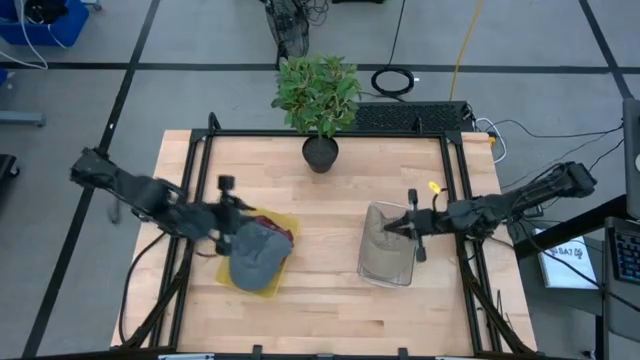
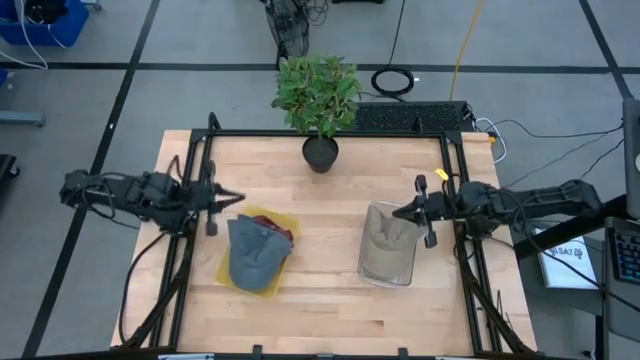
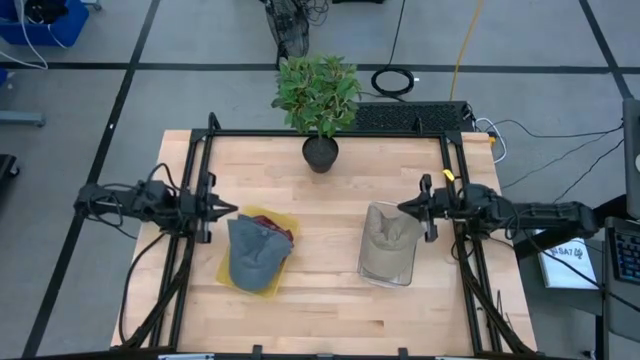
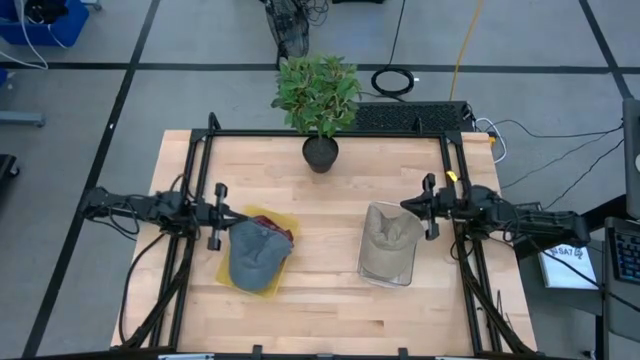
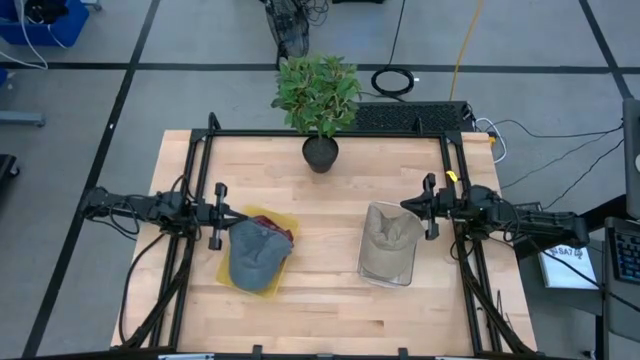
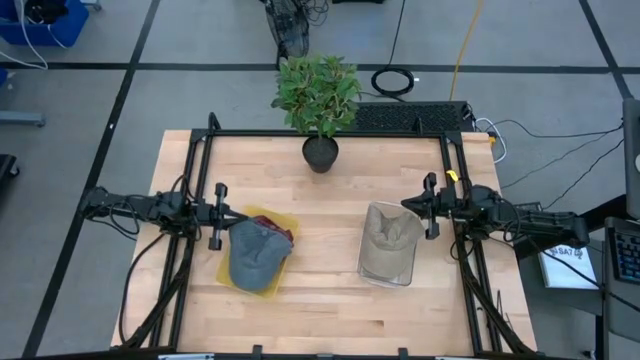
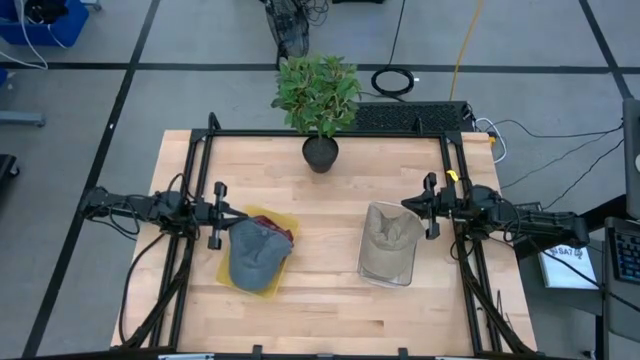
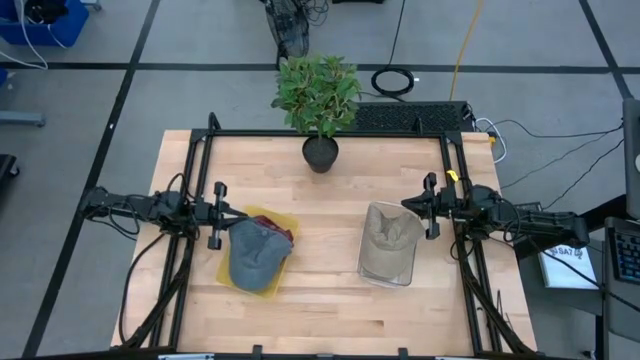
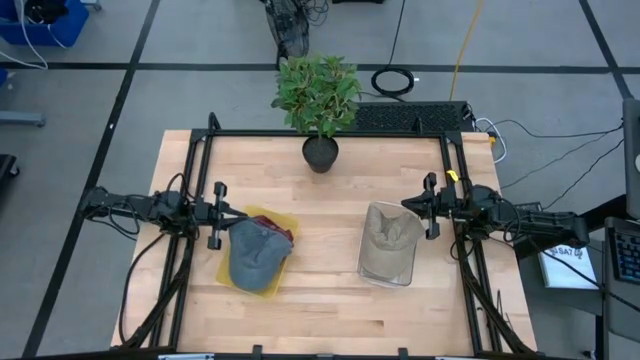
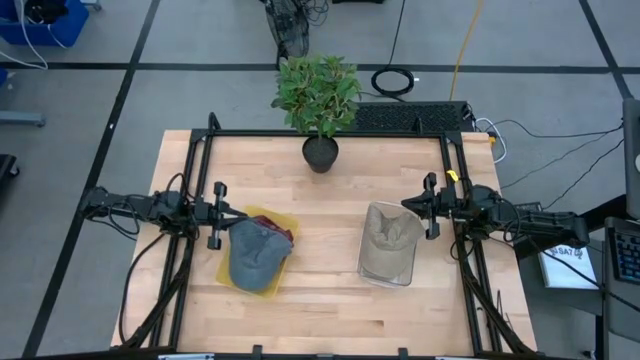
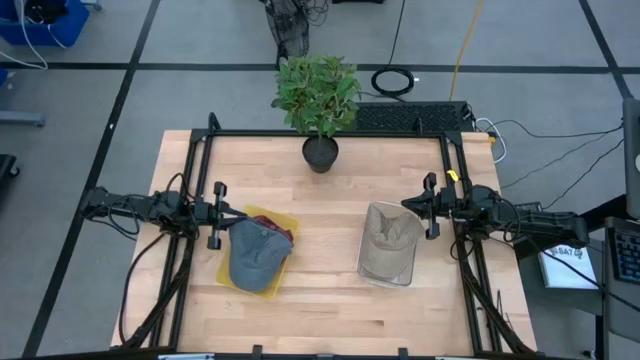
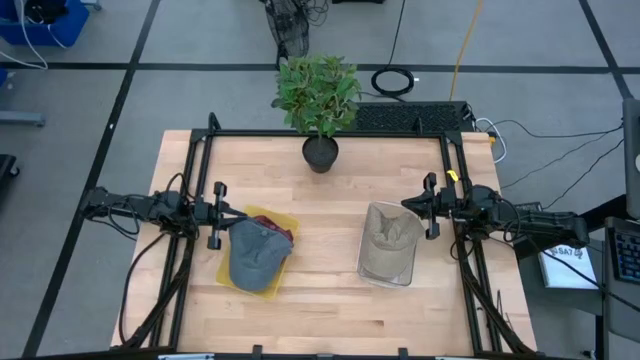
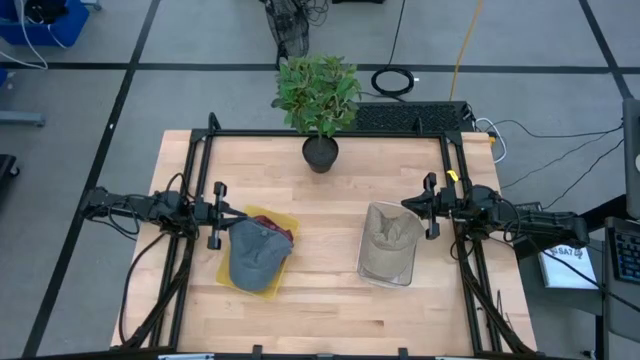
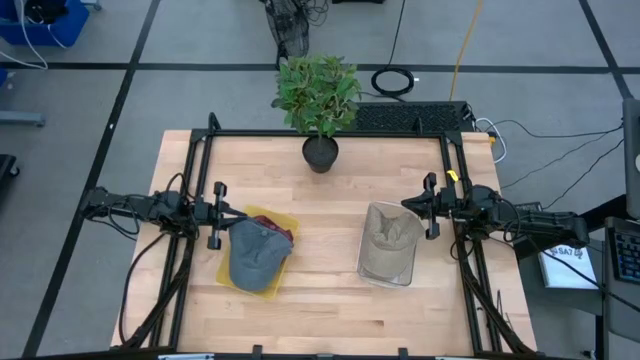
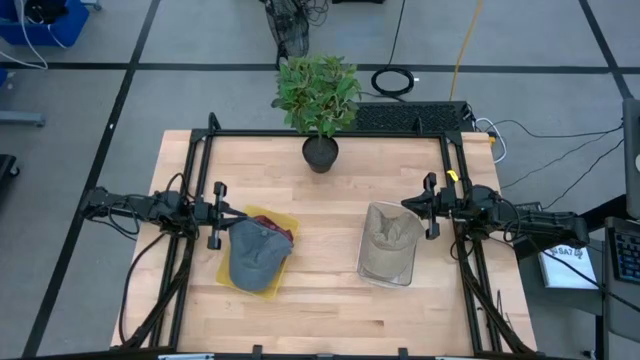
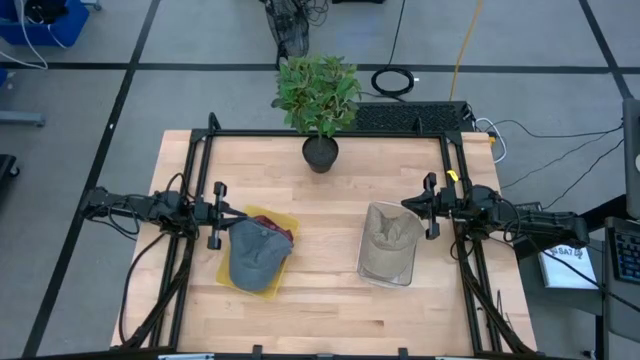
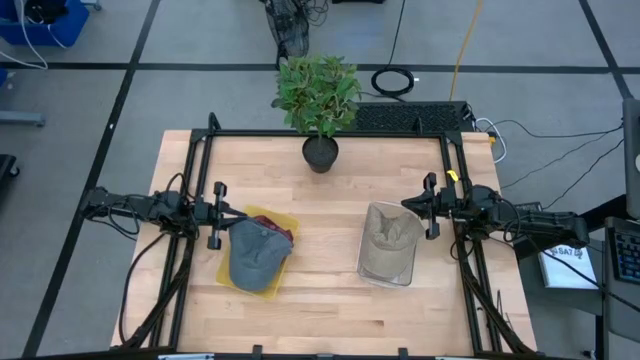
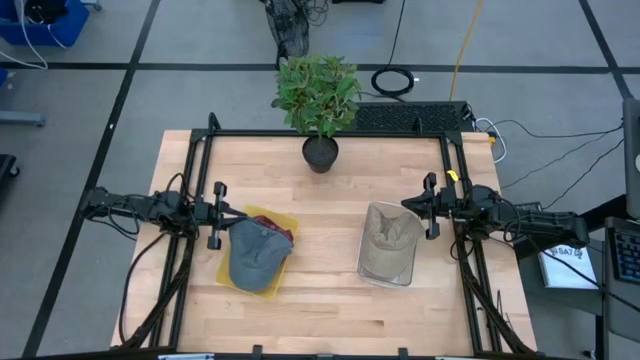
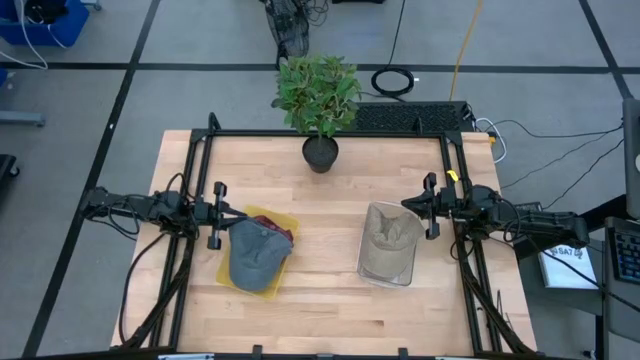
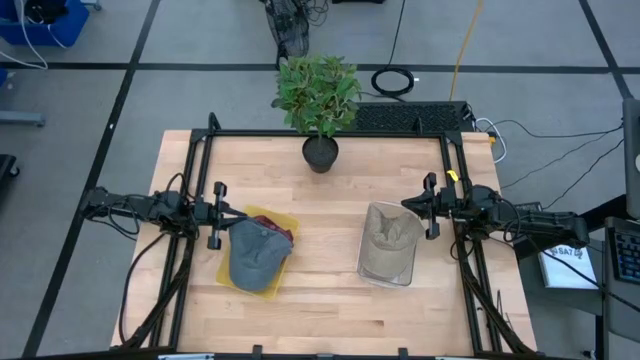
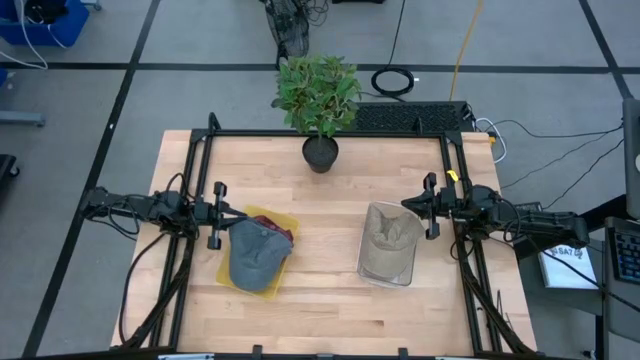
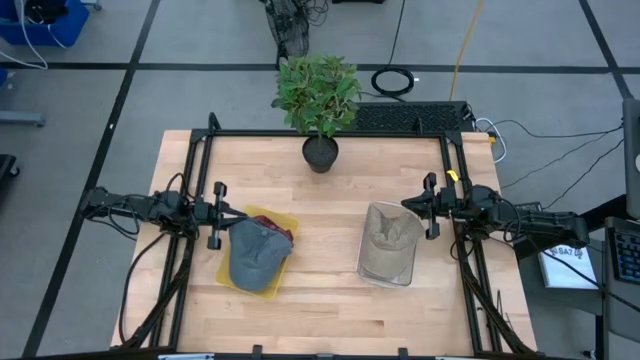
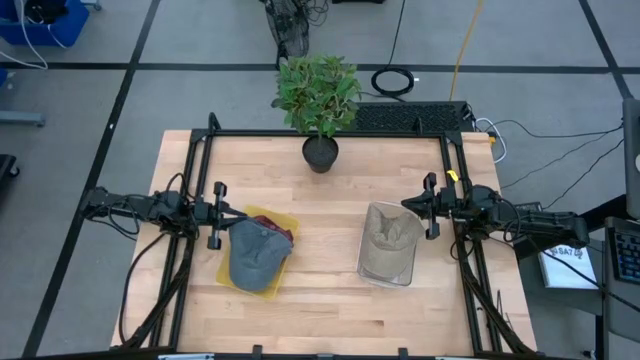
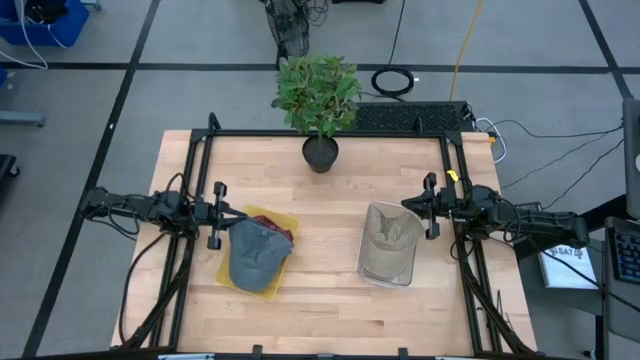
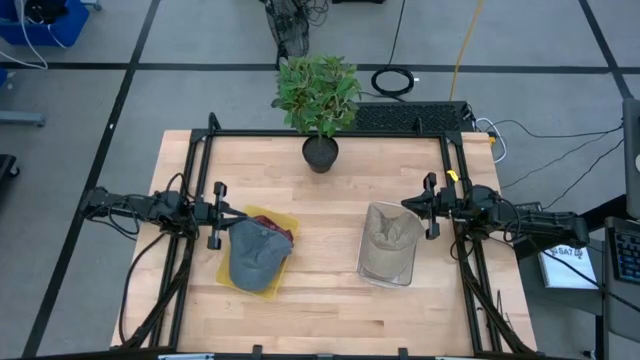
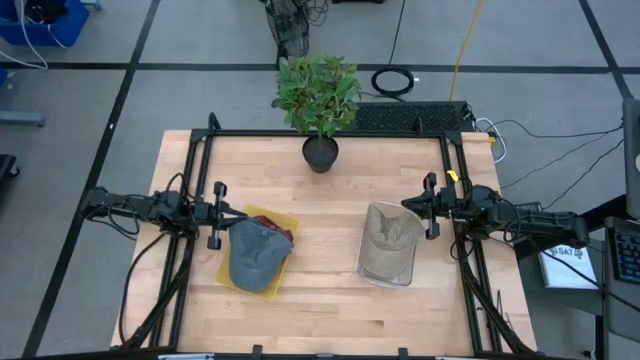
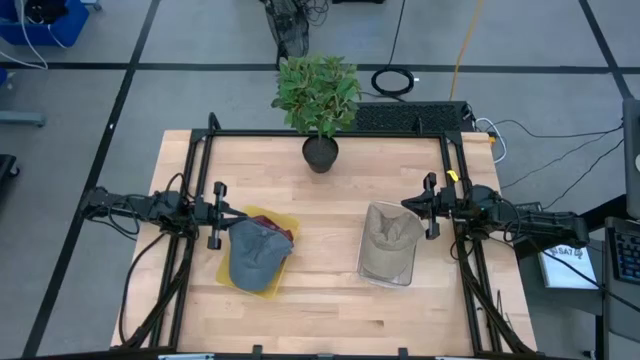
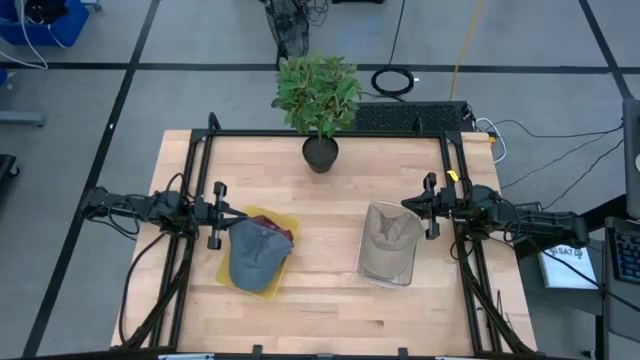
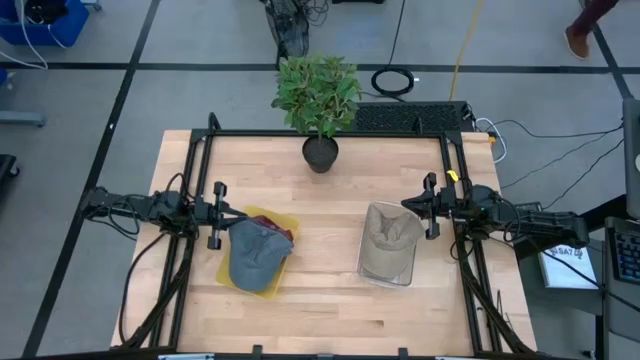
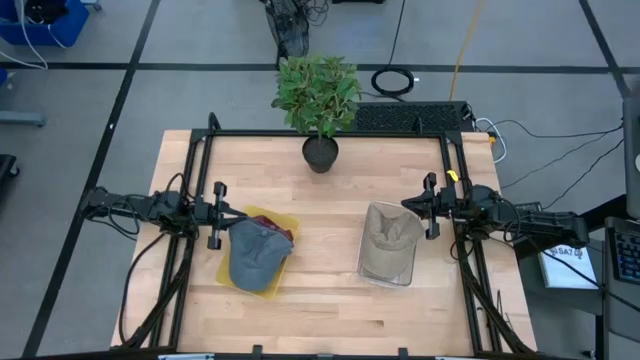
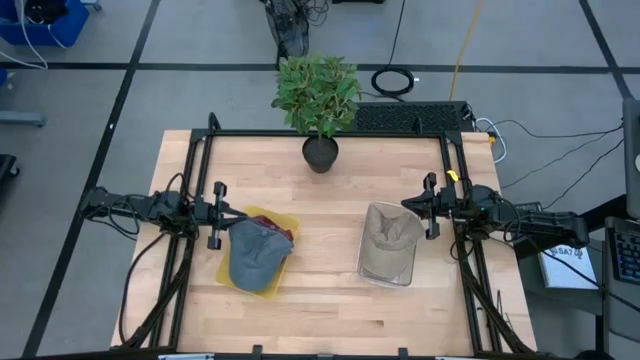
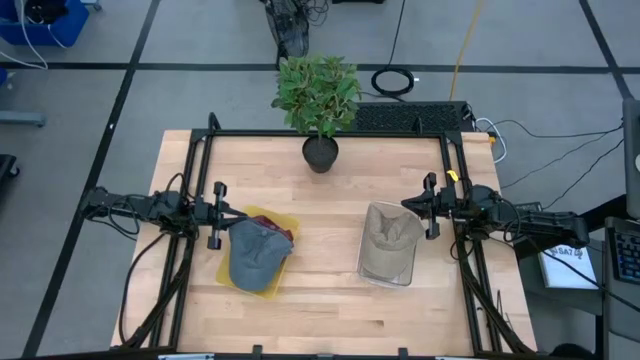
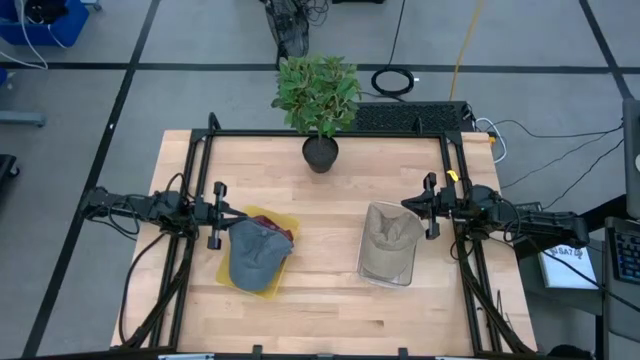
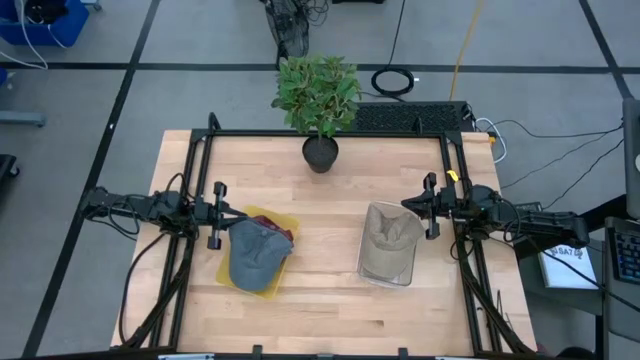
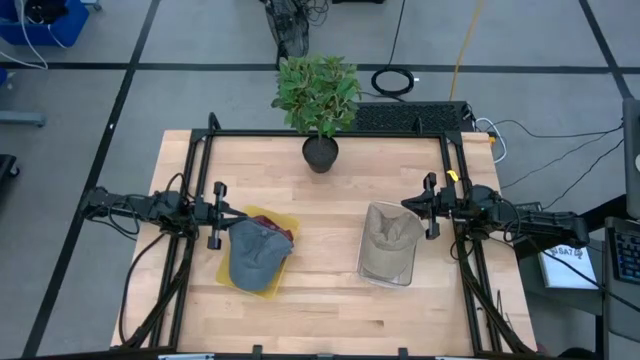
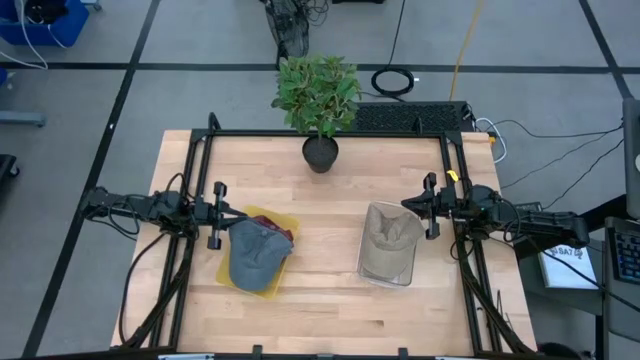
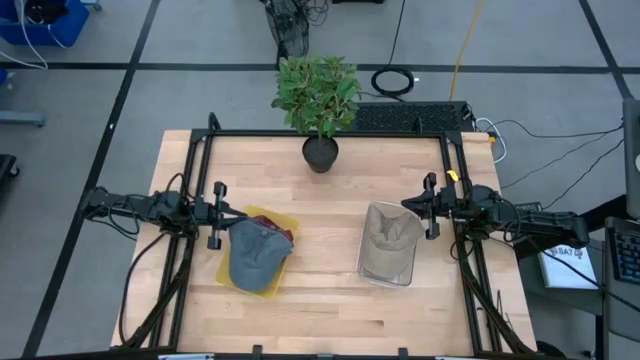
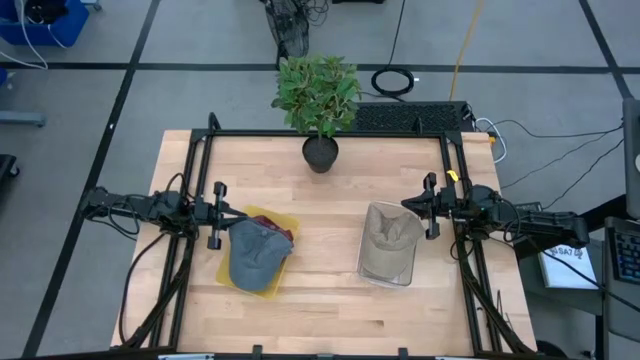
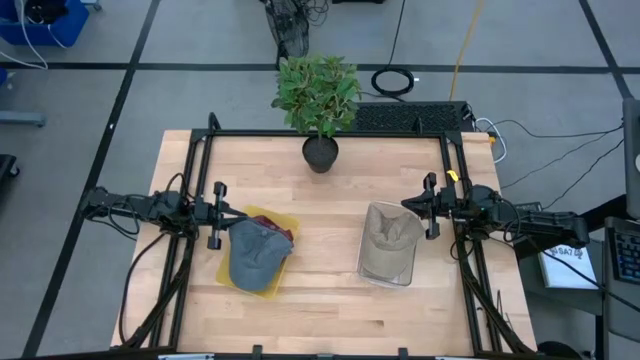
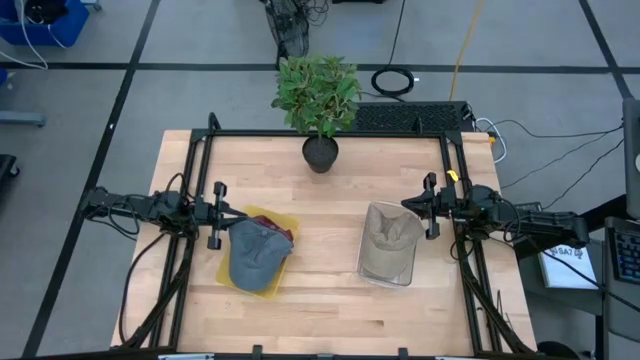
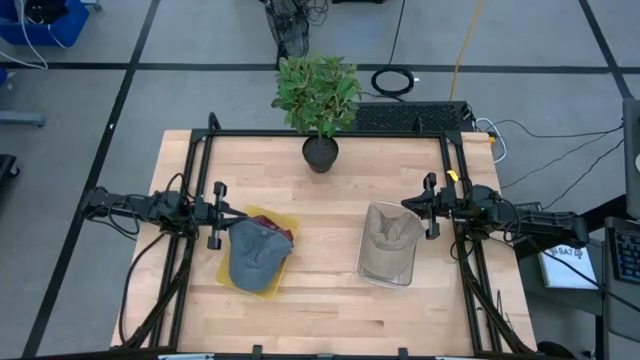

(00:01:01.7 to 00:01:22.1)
Task: Pick & Place hat
Return to Home Position

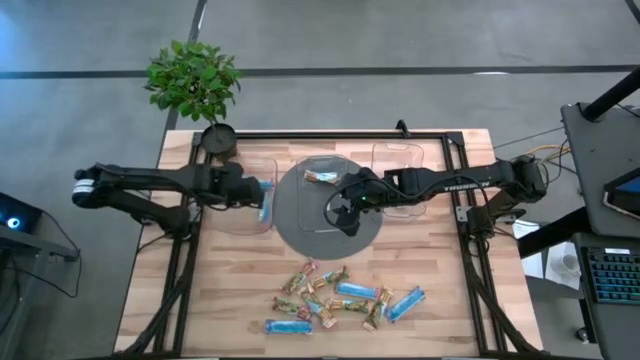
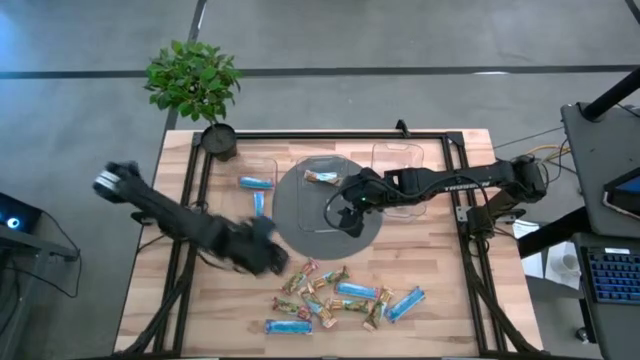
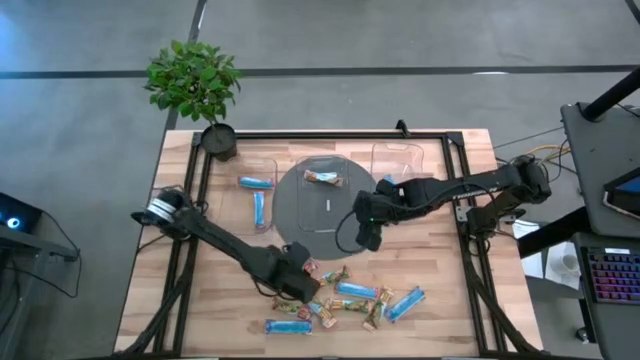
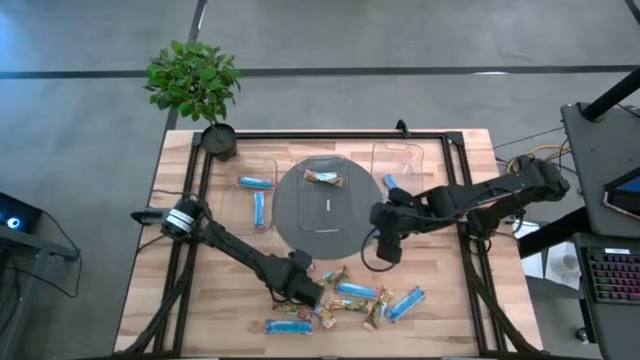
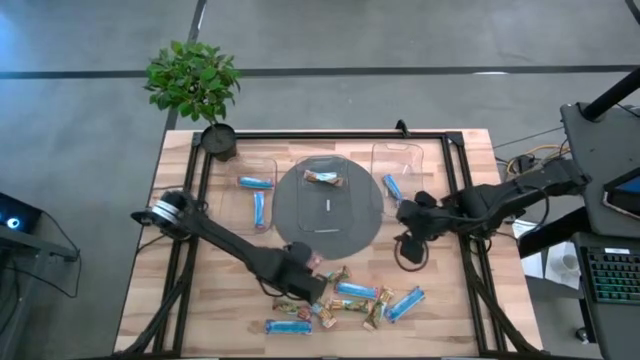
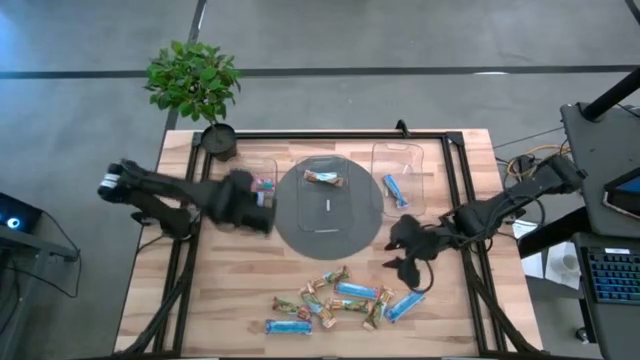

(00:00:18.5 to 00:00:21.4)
Task: Pick and place Granola Bars by type
Put the red granola bar into the left transparent bin
